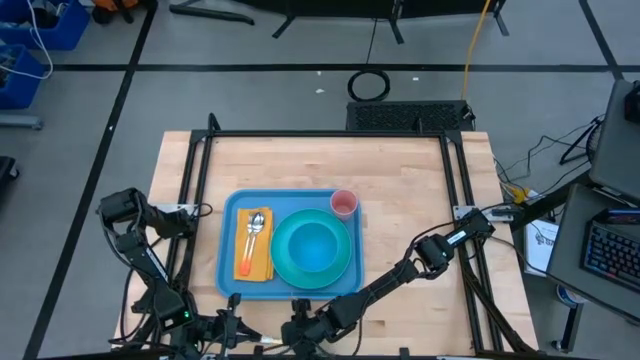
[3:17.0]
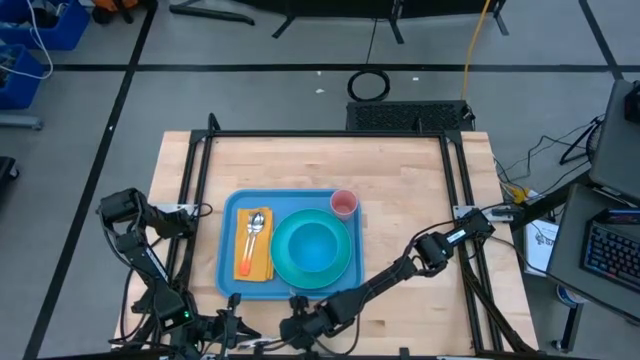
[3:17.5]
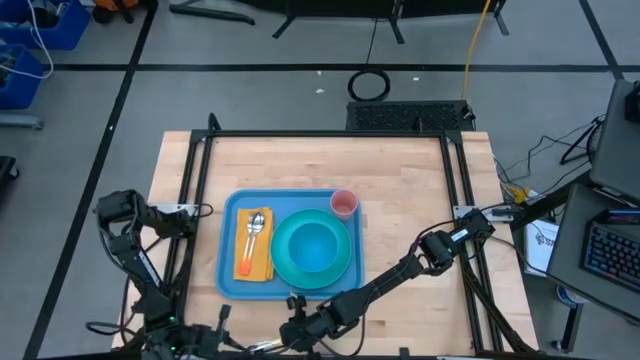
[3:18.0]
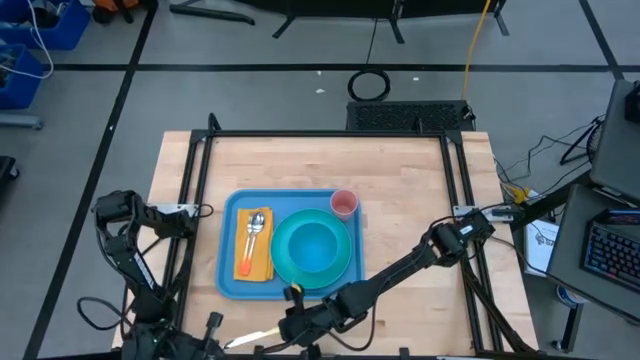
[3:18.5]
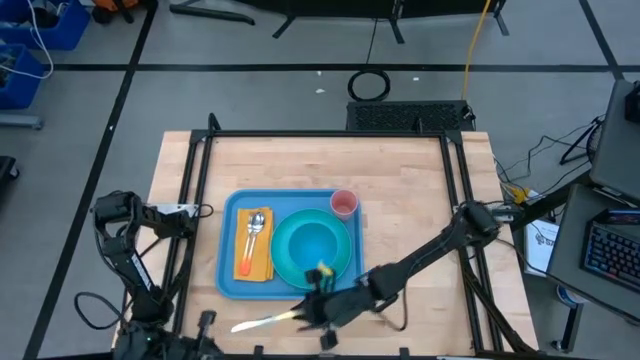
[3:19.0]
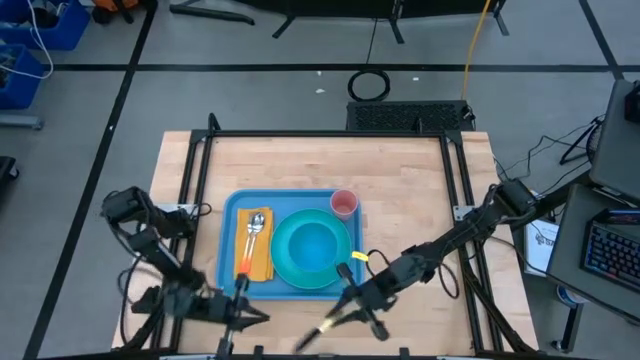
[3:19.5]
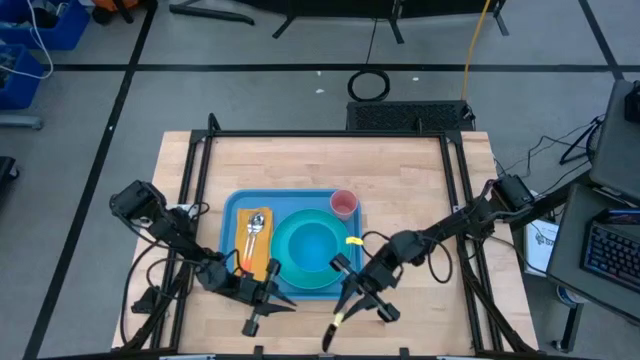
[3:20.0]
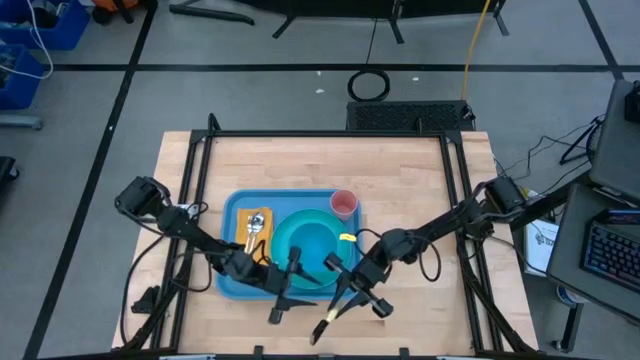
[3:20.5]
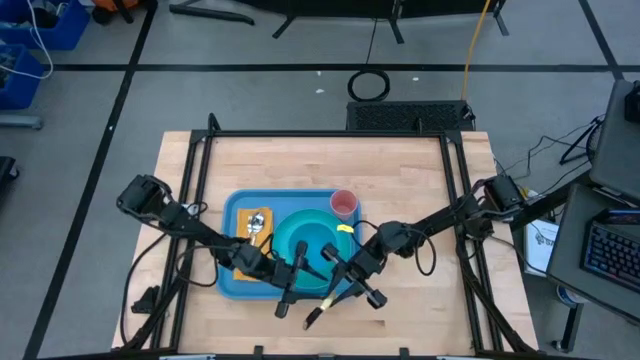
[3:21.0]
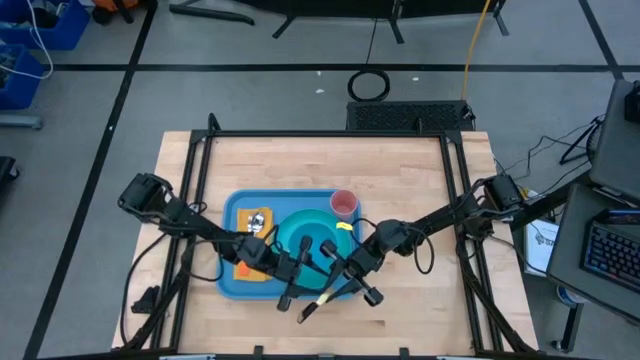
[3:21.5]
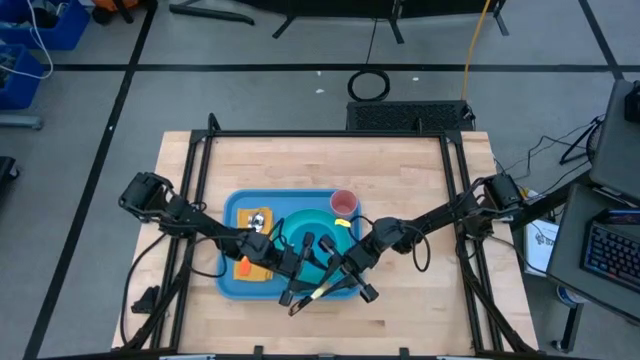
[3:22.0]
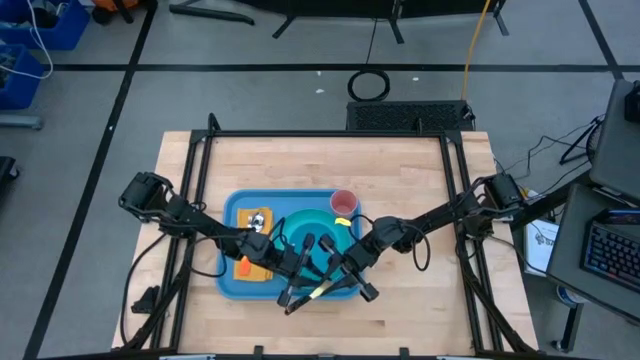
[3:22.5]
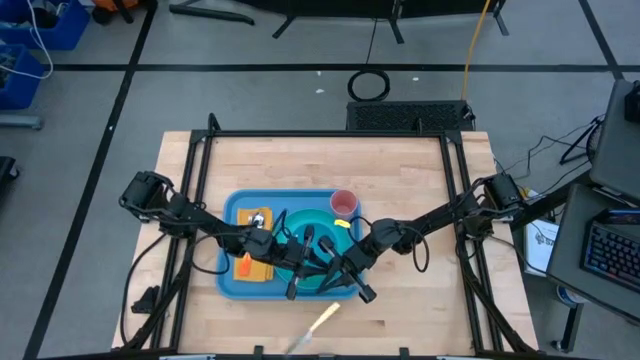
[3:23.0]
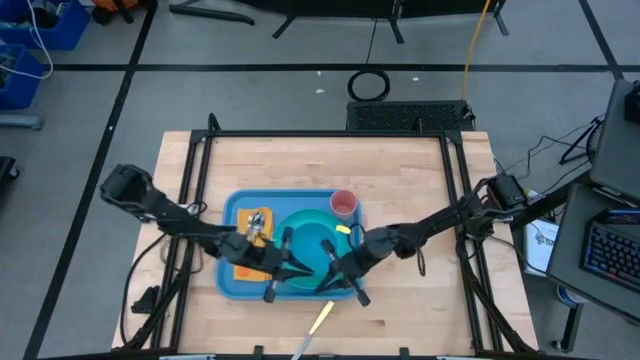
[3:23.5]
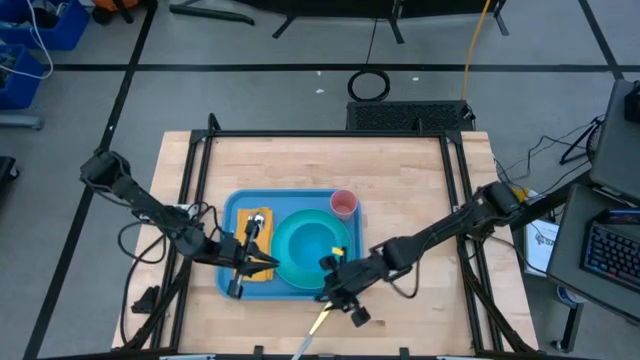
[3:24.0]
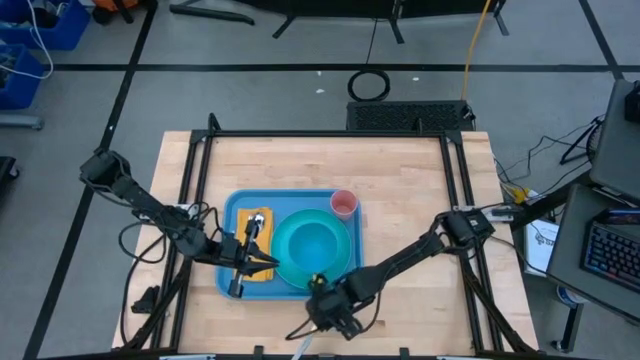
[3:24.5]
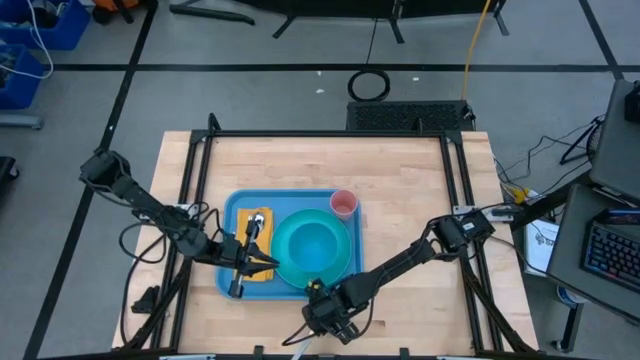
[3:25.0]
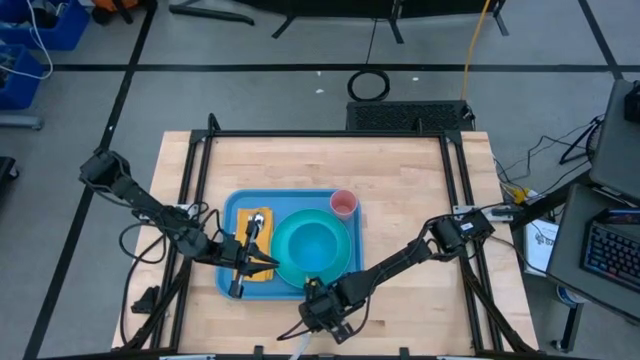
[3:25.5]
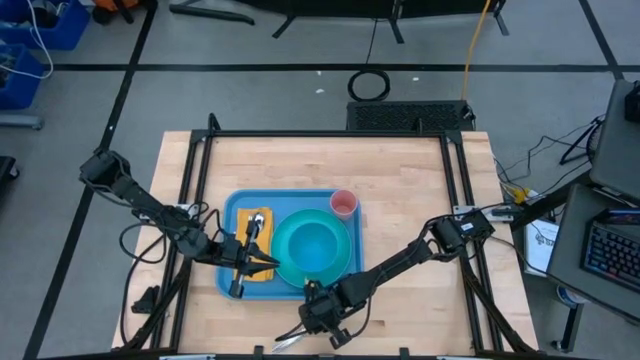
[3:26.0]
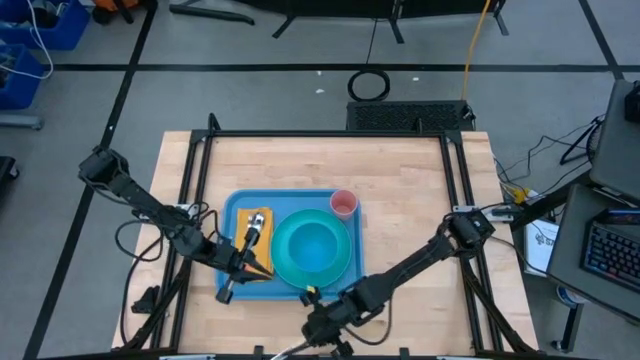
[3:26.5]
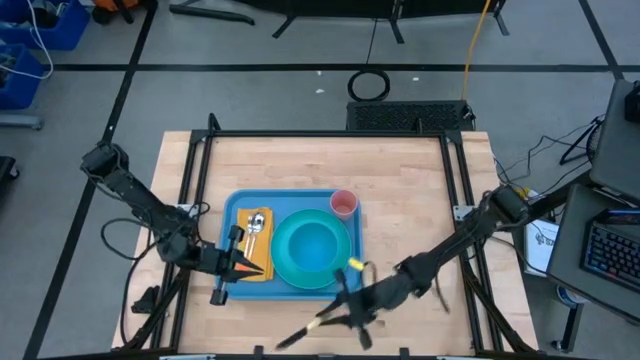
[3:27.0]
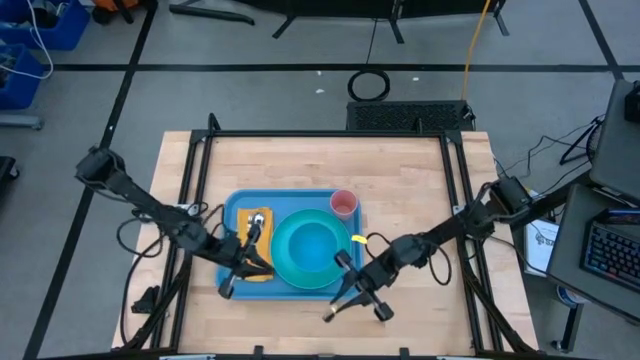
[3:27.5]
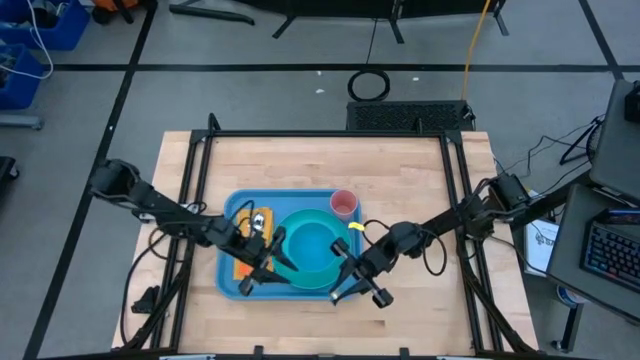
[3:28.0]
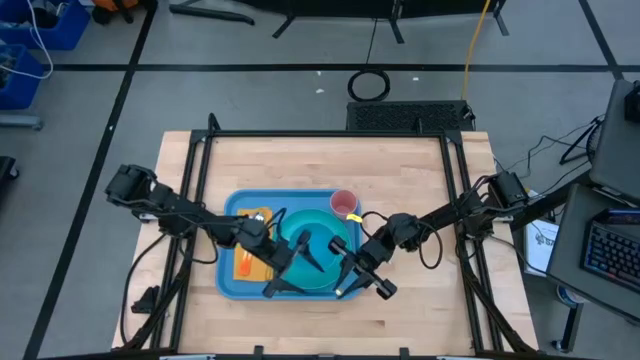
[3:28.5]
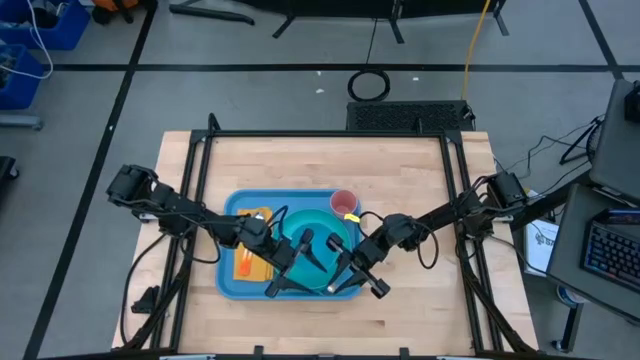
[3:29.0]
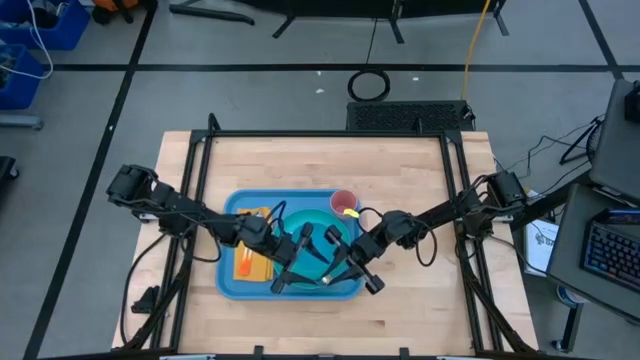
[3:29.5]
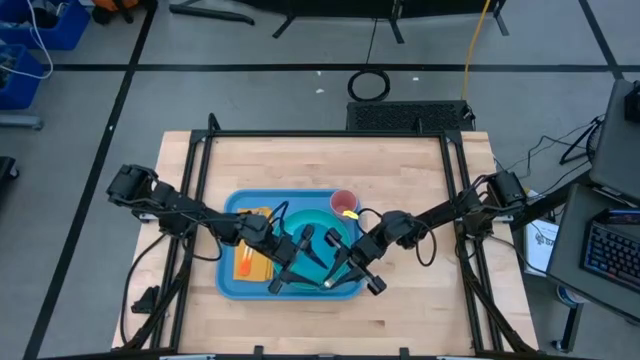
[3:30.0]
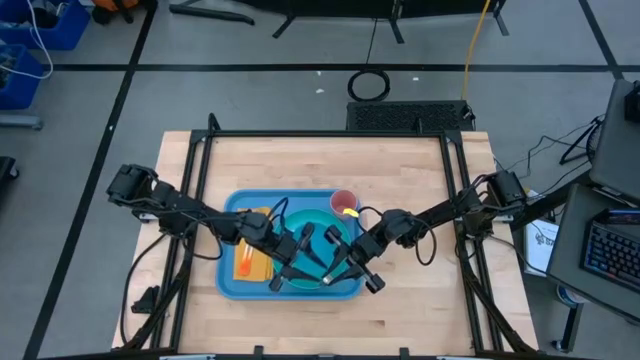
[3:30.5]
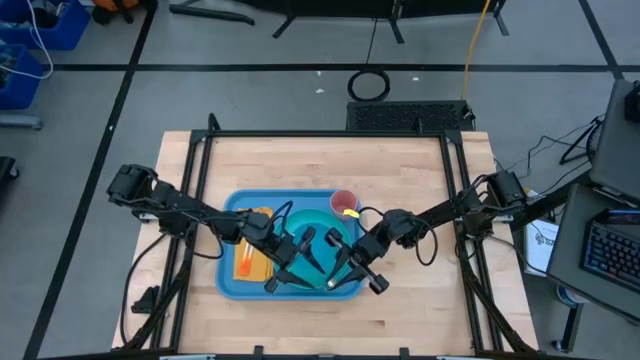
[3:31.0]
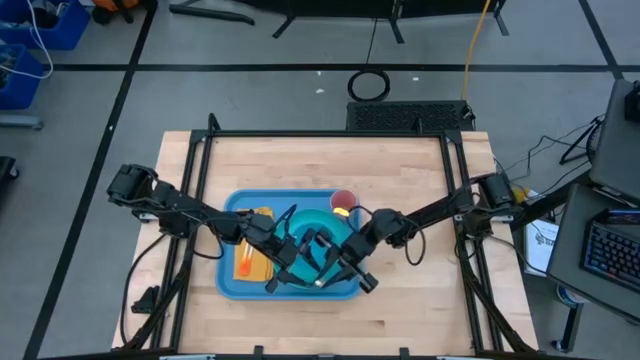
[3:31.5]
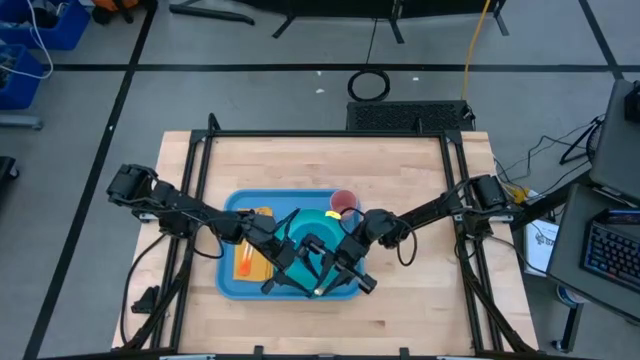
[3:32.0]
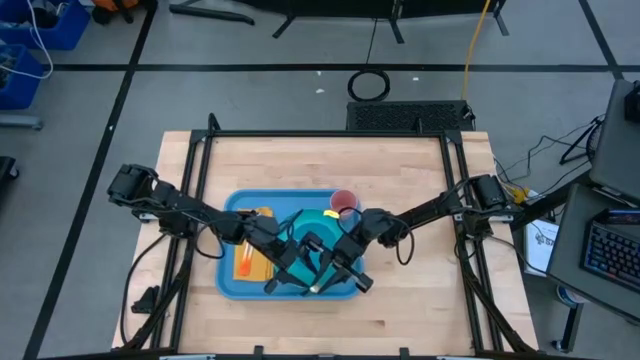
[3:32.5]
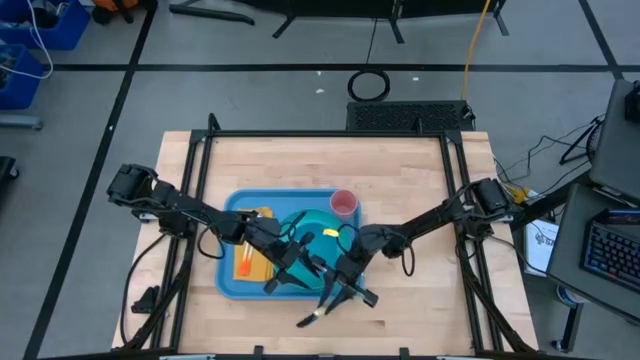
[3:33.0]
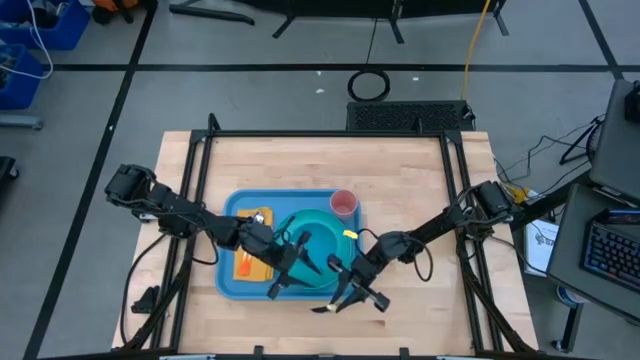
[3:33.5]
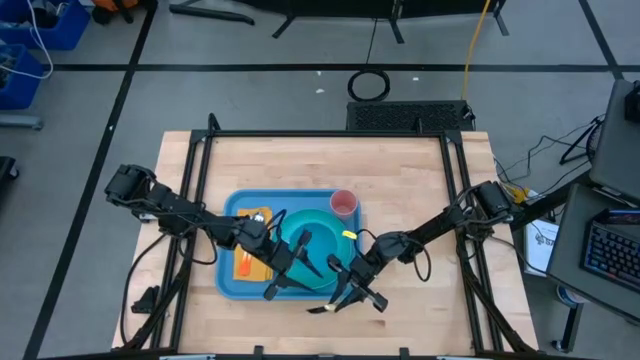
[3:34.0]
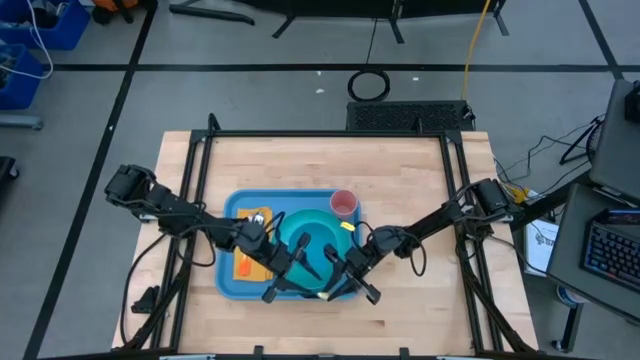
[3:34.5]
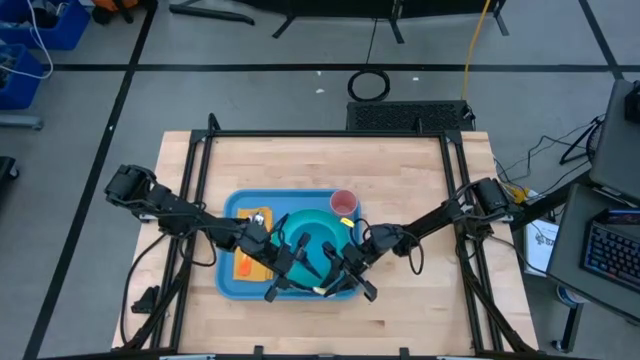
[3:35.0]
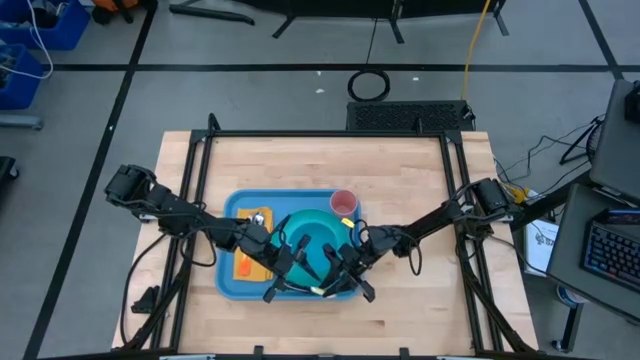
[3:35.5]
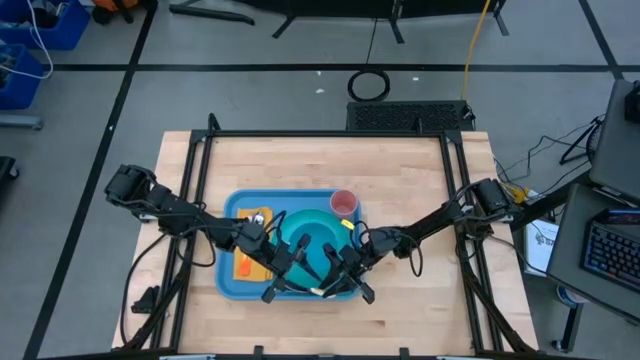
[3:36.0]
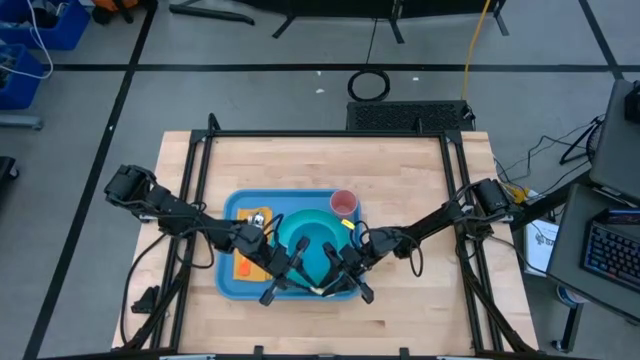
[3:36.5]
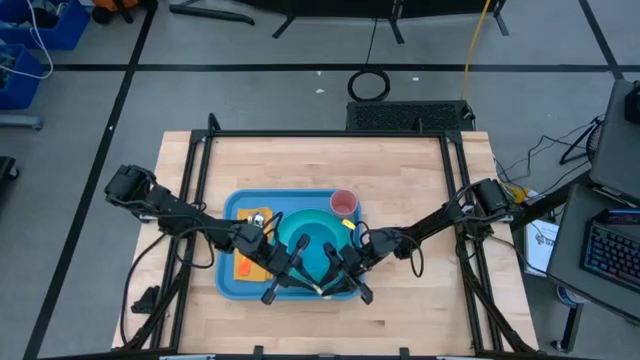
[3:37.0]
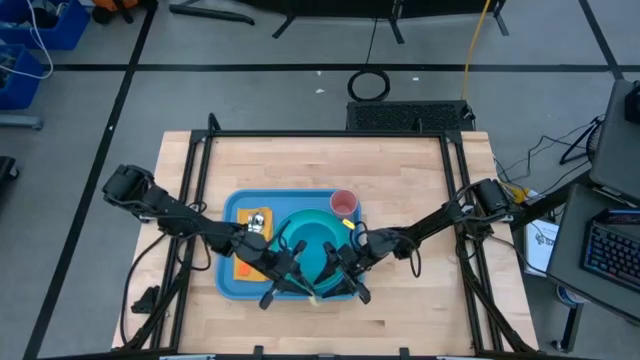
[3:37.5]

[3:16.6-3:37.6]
Task: Set up tray
Put the yellow knife on the blue serving tray to the left of the orange spoon
